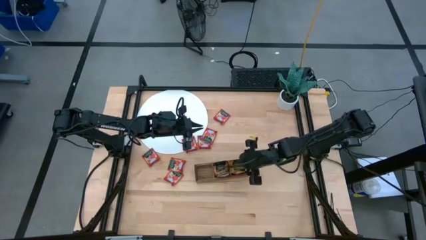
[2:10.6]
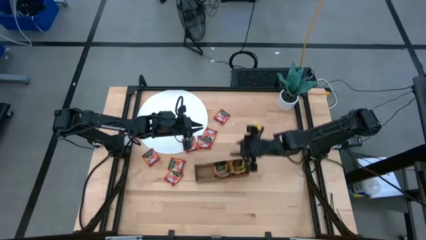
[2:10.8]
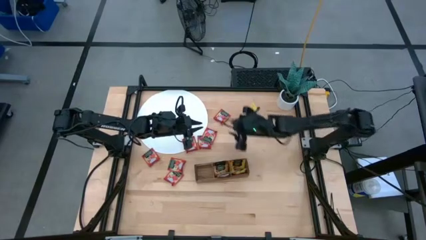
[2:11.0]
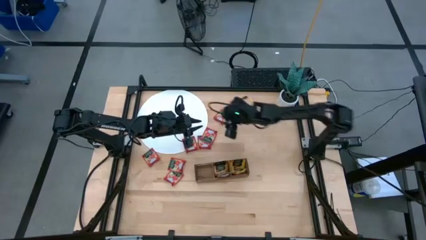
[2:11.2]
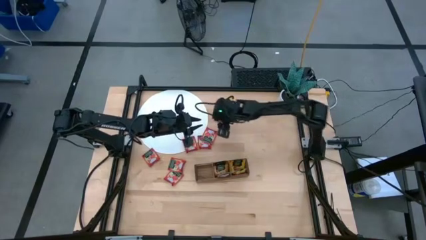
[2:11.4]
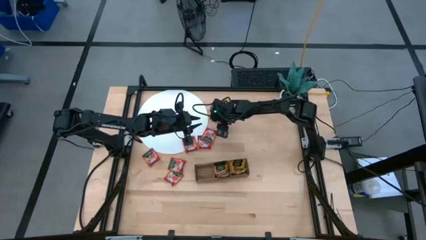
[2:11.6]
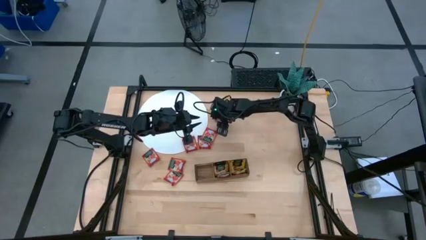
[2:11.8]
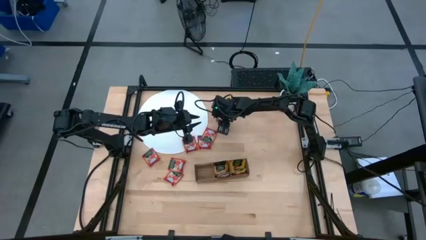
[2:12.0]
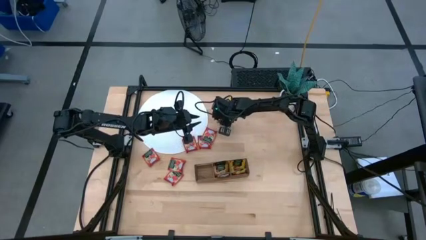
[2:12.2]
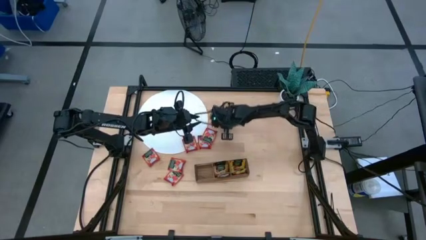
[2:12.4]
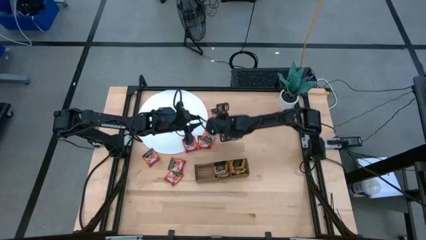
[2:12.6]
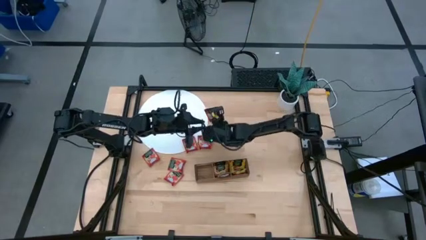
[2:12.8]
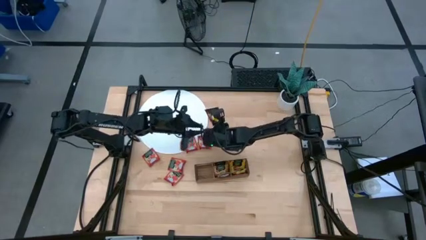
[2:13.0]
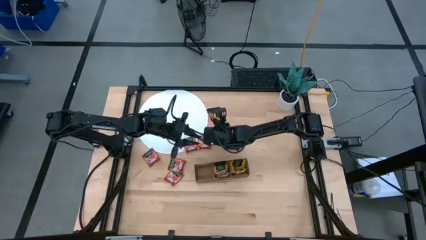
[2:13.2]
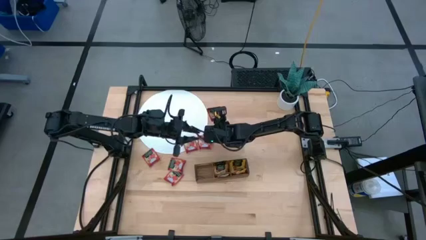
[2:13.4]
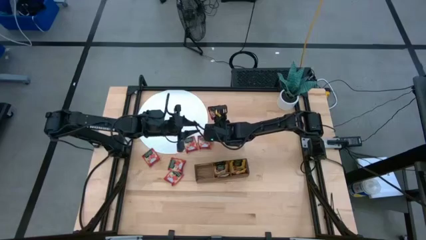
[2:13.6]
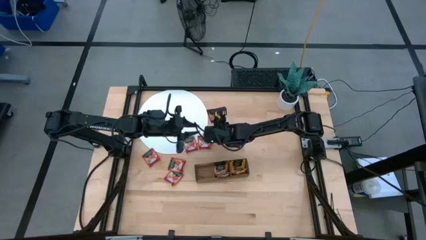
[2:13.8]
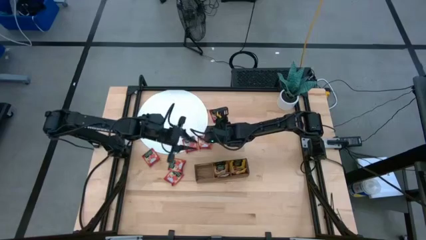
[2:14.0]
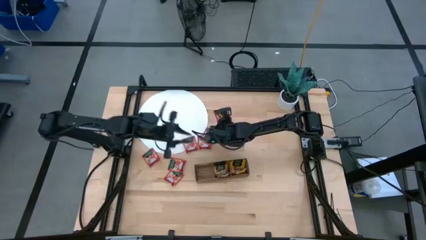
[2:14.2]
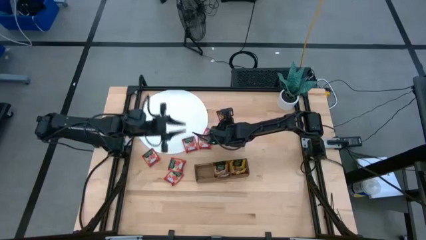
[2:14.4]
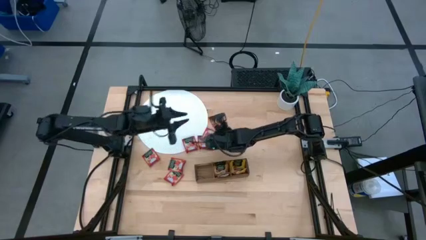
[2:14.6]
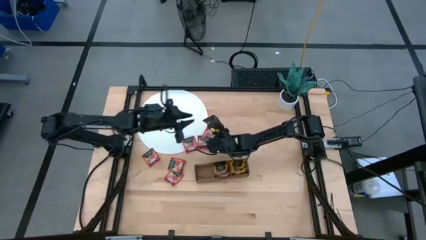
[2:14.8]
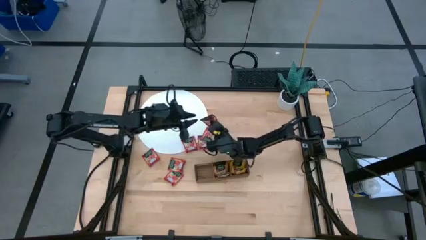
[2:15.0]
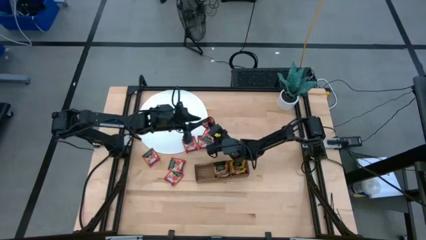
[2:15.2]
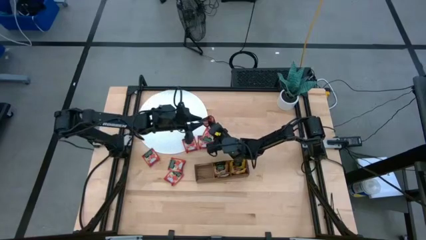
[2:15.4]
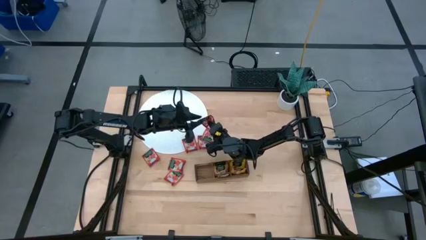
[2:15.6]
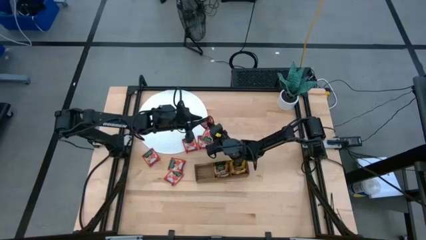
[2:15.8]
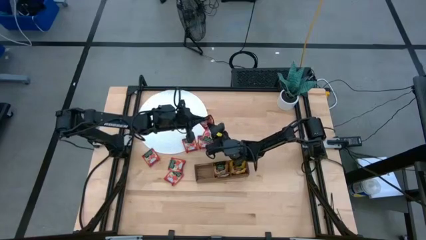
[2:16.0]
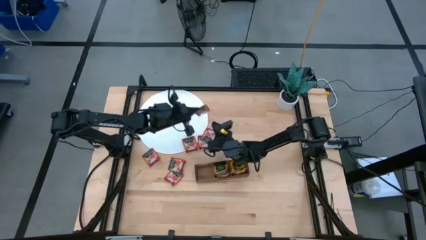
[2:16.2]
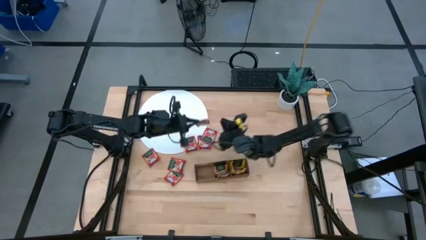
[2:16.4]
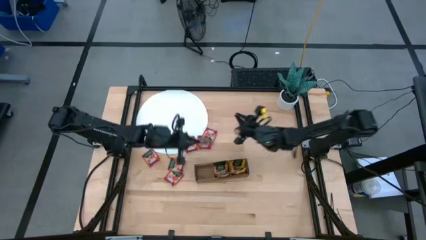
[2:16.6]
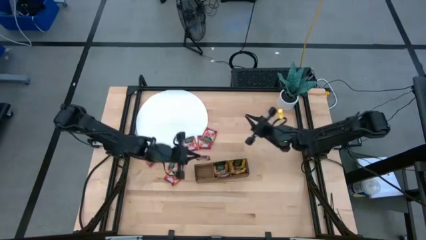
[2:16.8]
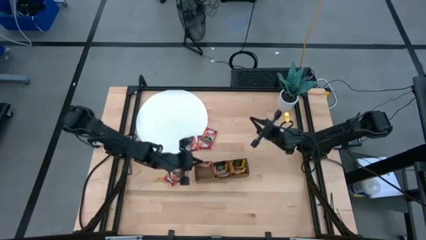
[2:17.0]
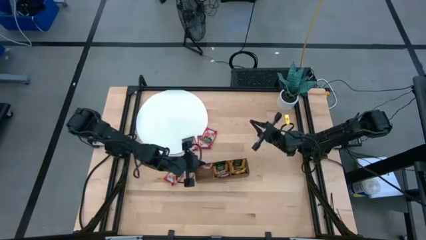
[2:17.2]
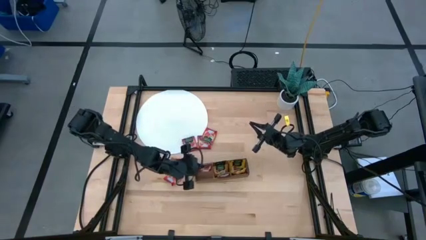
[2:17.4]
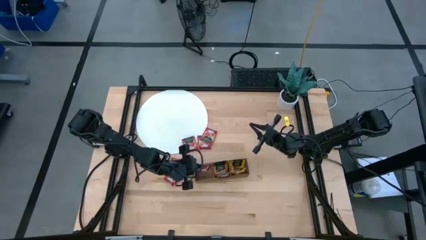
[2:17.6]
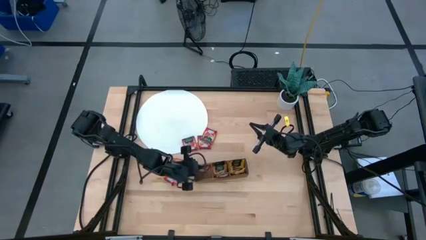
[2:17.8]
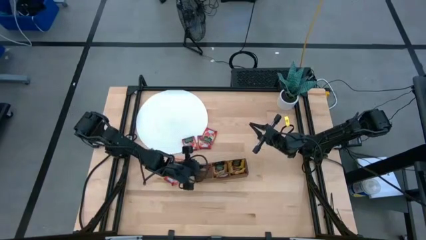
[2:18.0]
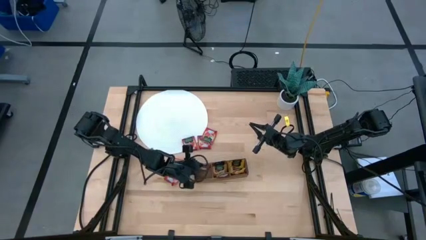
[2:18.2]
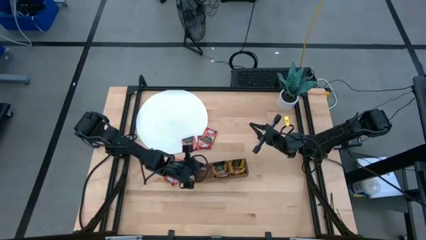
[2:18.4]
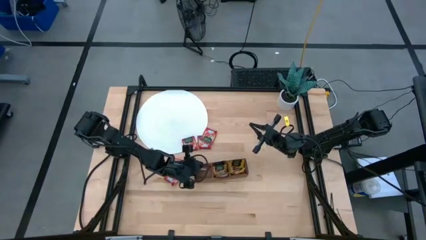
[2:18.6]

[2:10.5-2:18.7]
Task: Pick & Place Tea
Put the red tea bag into the left section of the wooden organizer

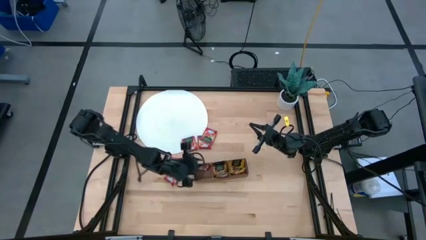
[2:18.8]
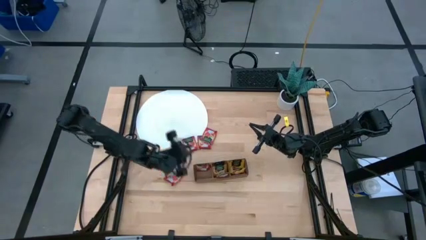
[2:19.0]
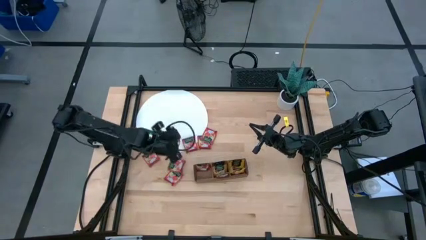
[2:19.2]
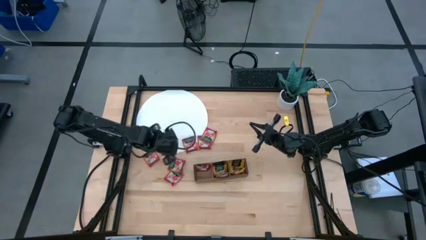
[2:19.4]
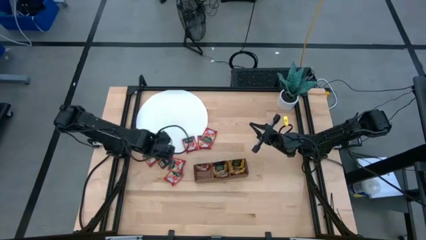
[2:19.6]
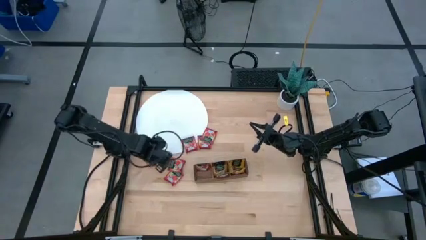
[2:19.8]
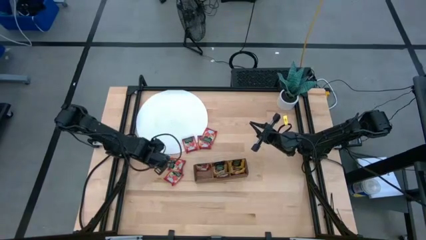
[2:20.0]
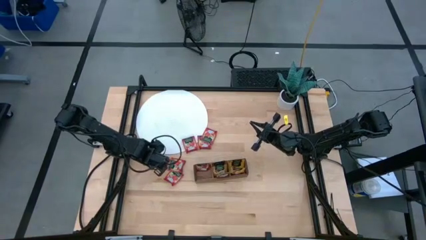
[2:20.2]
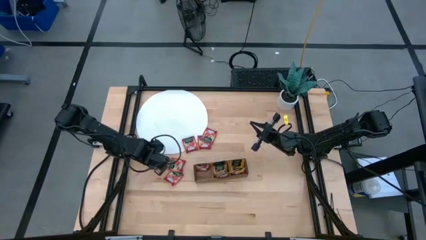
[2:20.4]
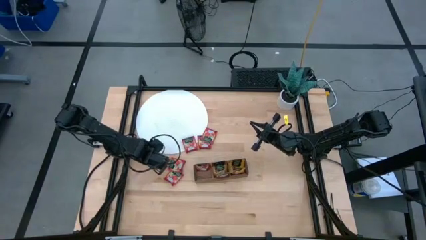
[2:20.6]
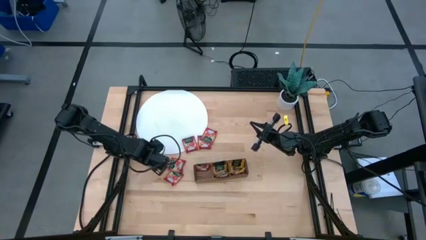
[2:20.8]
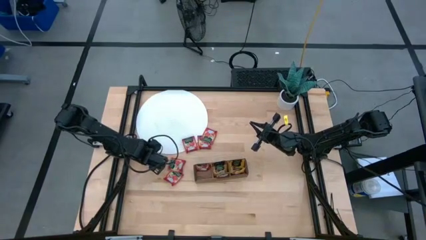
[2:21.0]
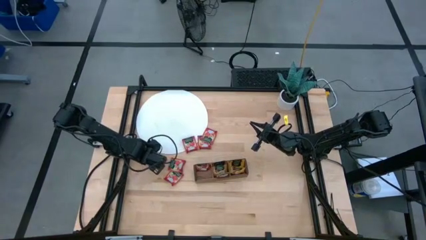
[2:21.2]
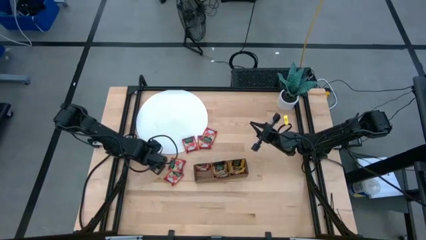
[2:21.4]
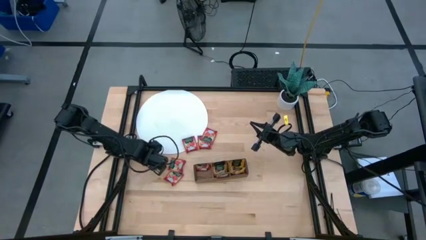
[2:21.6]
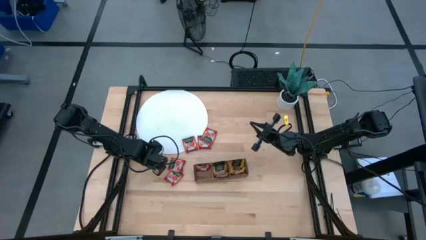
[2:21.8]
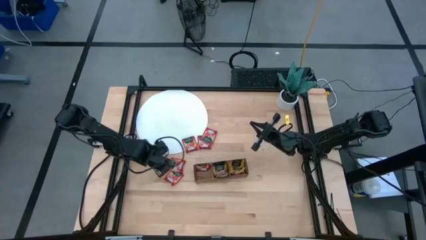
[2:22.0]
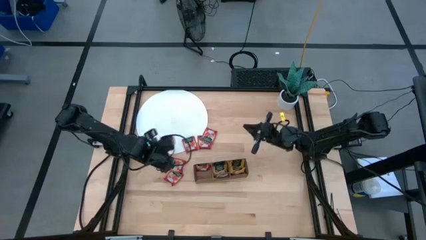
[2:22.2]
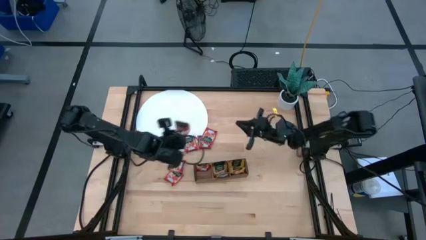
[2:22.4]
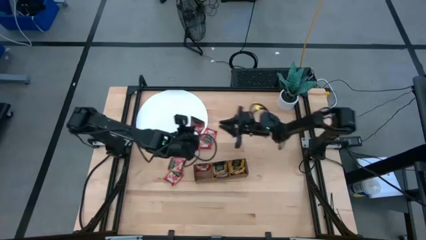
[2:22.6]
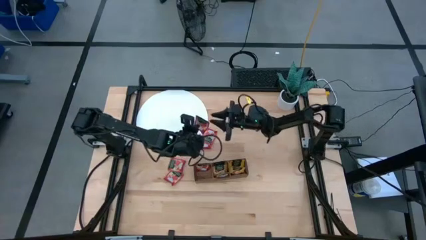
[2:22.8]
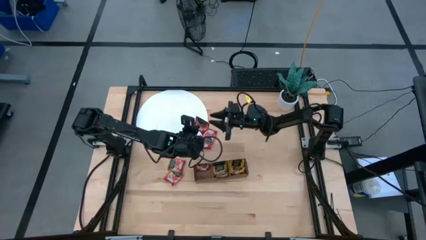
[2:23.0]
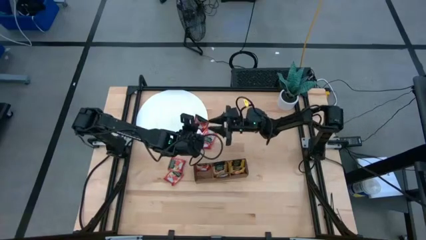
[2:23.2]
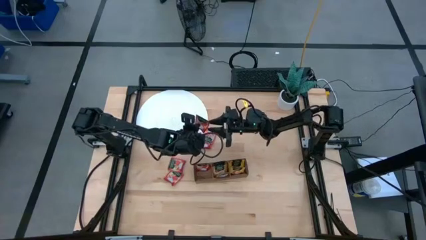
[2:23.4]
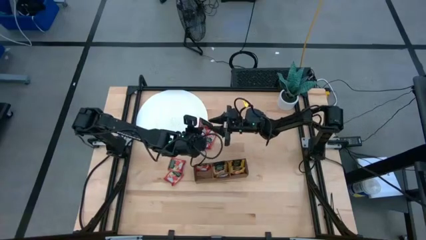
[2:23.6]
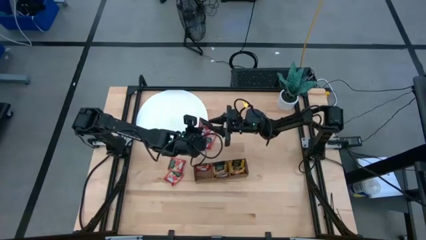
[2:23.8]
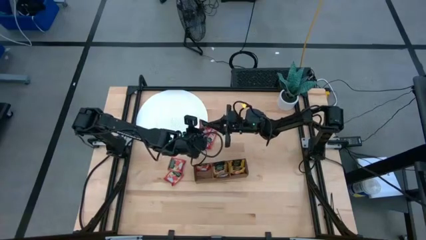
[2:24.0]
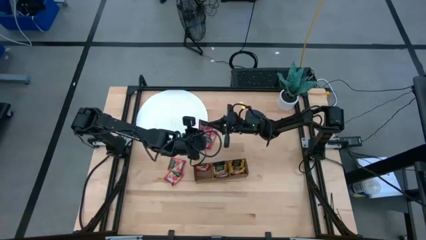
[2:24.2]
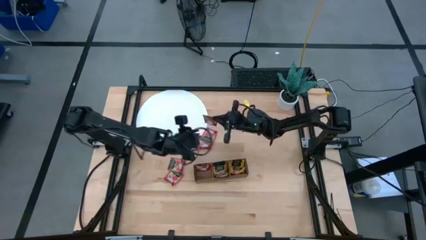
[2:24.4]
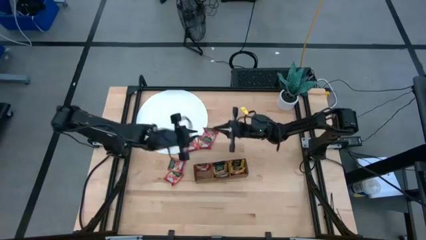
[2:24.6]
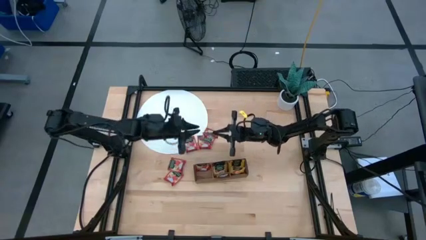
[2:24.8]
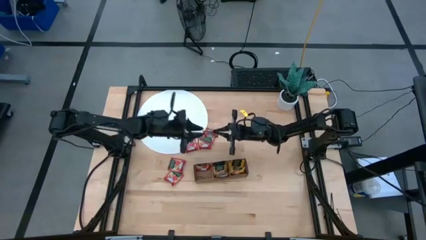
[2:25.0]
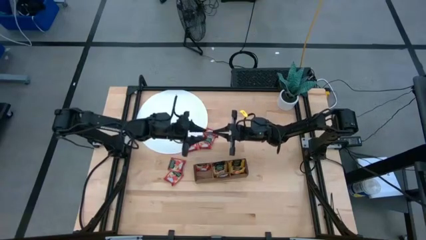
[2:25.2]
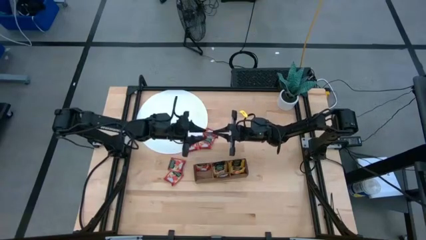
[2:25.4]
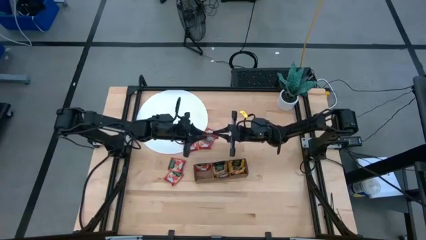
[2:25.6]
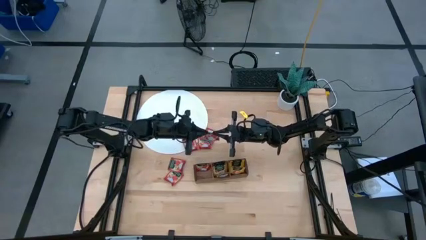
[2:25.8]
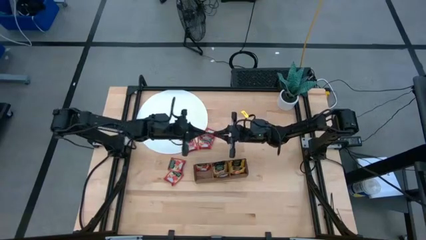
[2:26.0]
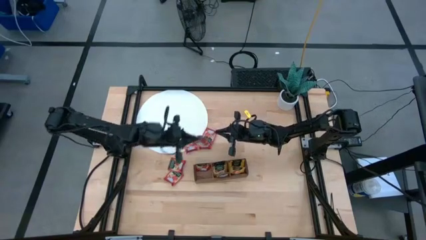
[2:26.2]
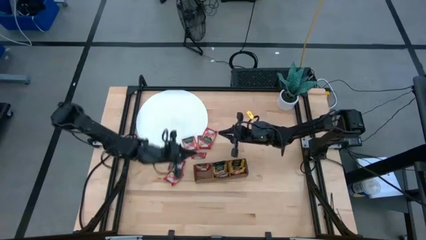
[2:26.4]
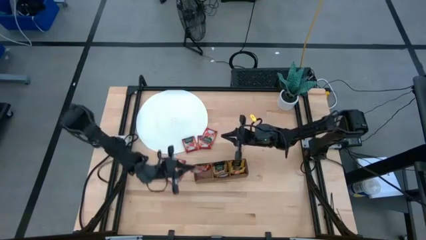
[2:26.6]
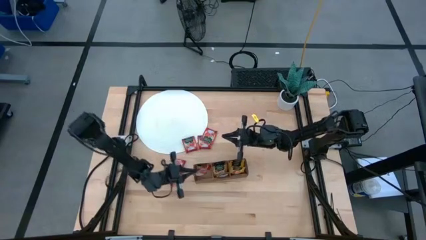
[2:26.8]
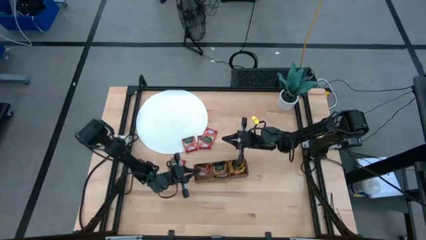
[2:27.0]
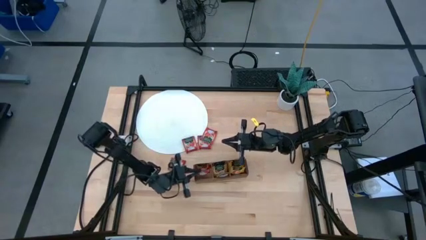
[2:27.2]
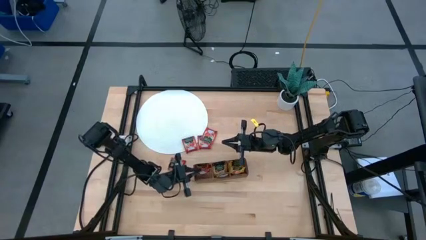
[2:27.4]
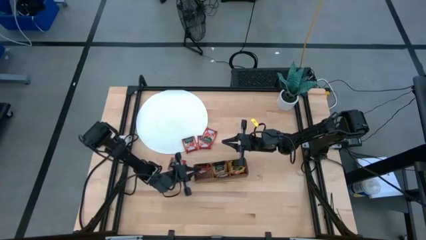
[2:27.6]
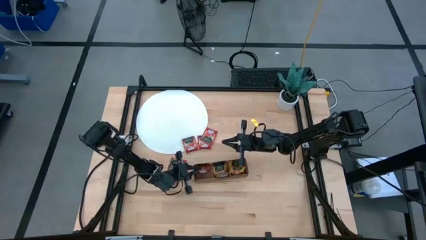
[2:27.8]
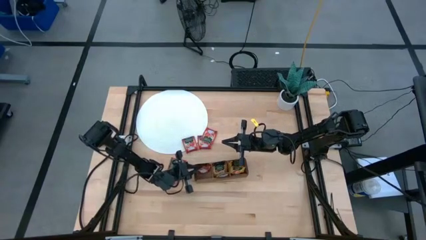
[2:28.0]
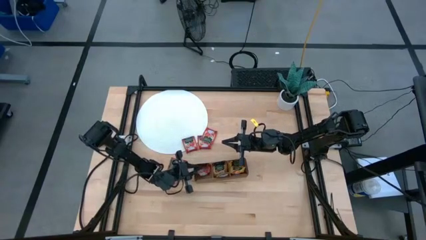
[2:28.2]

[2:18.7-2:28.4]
Put the red tea bag into the left section of the wooden organizer
